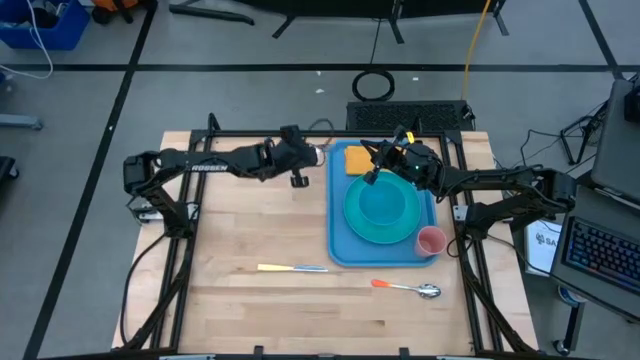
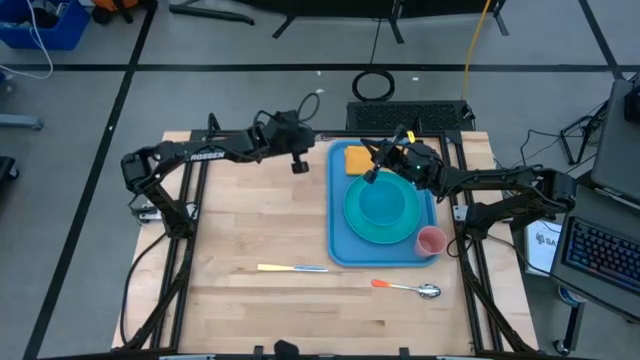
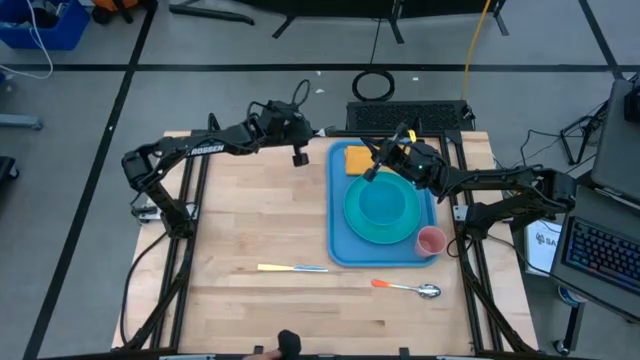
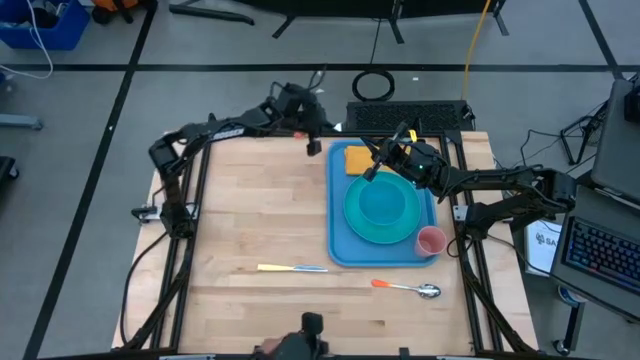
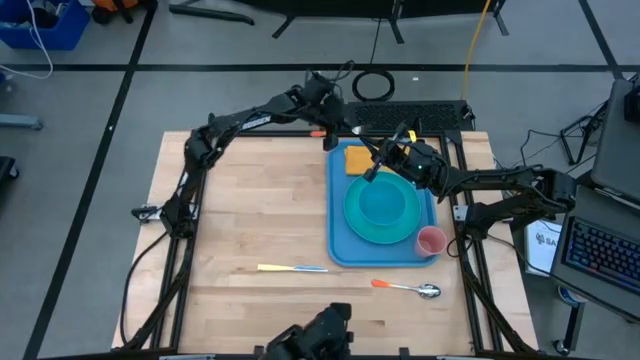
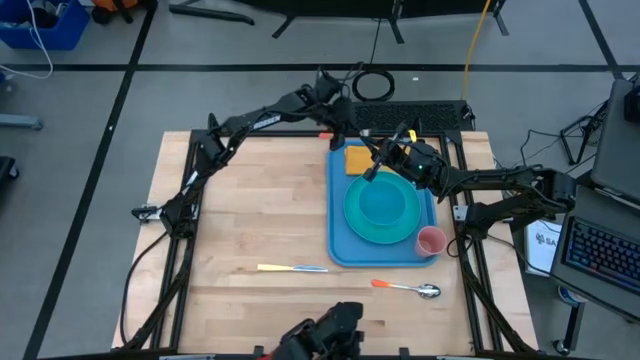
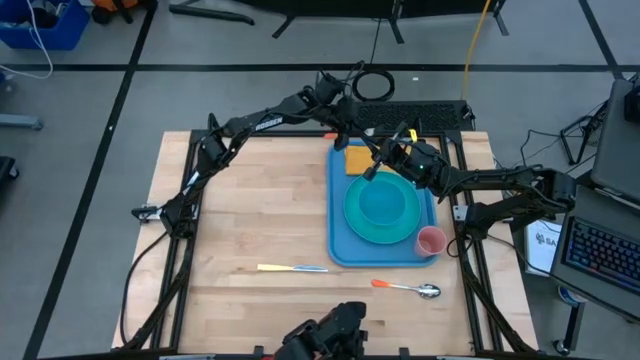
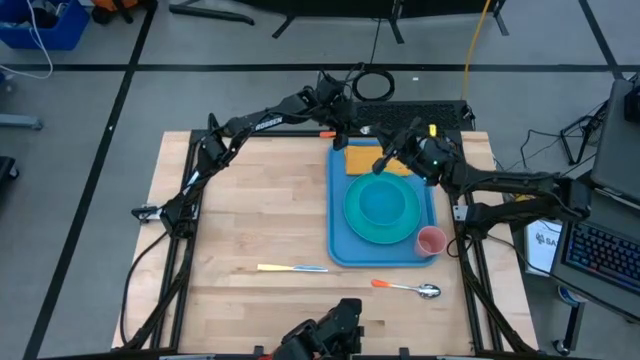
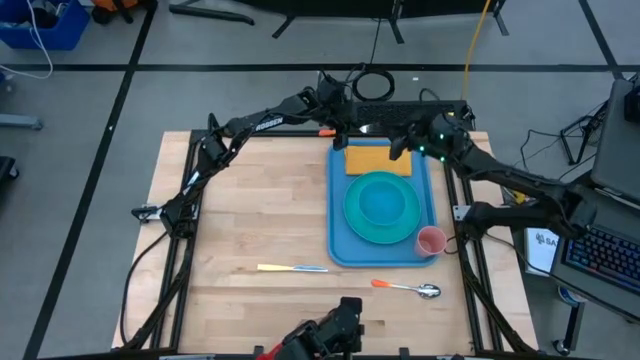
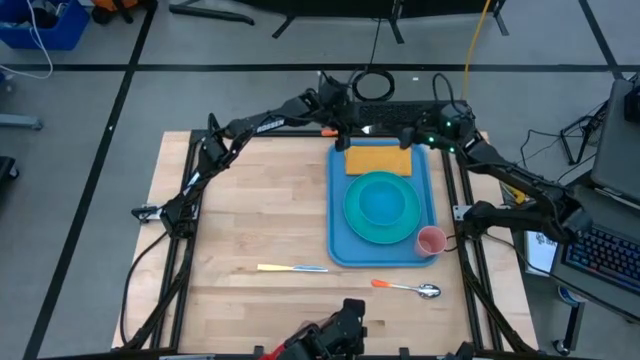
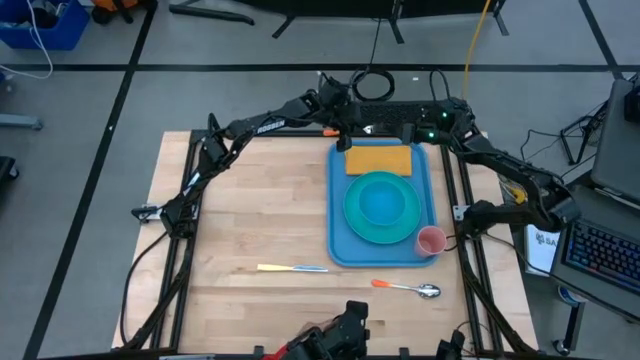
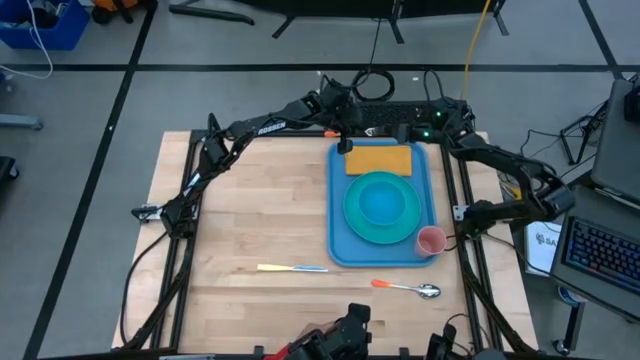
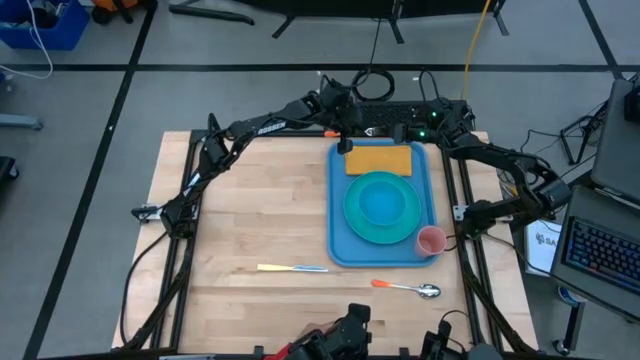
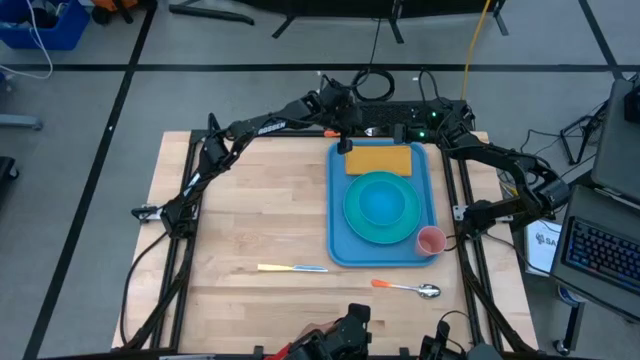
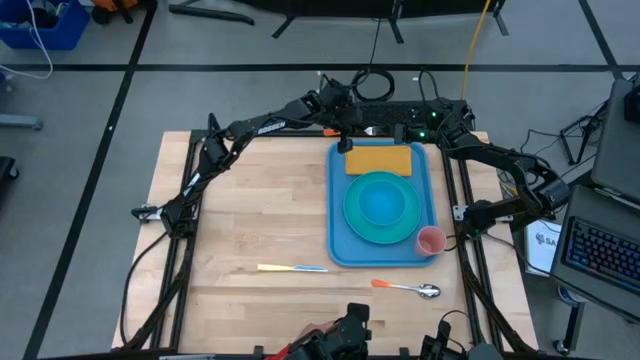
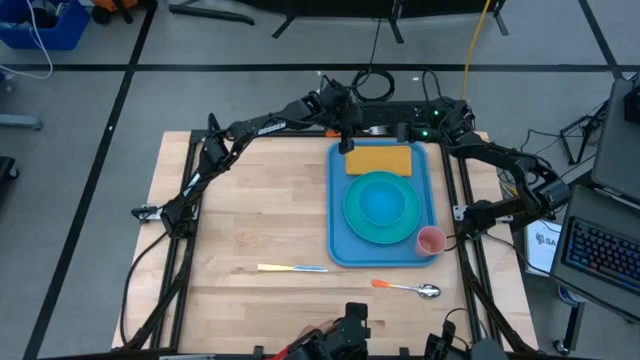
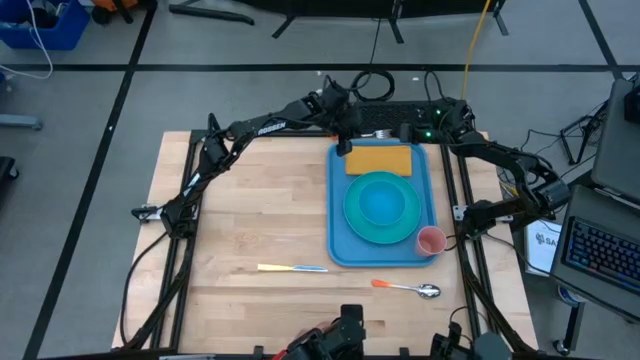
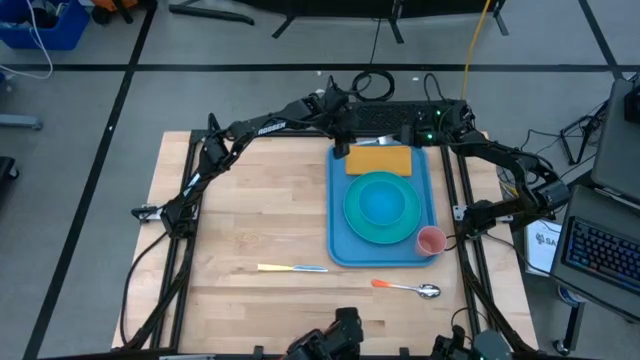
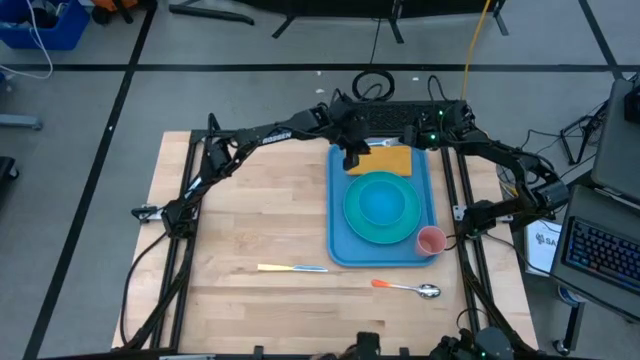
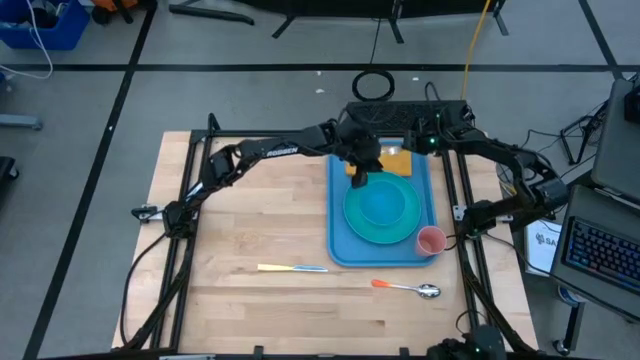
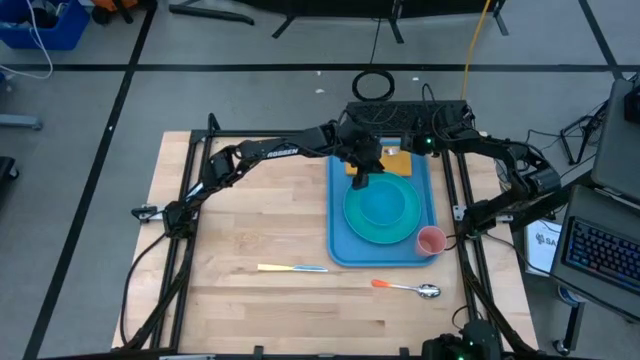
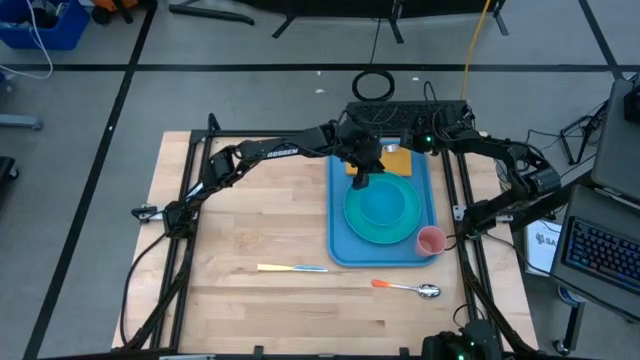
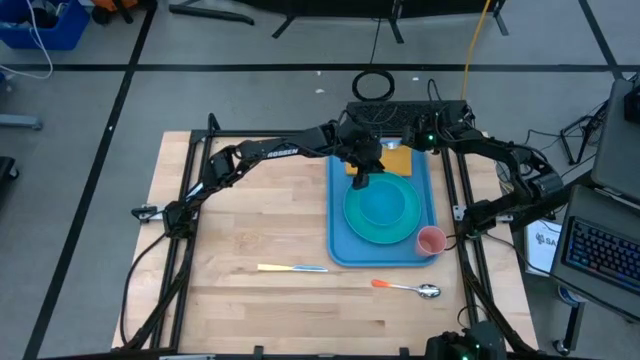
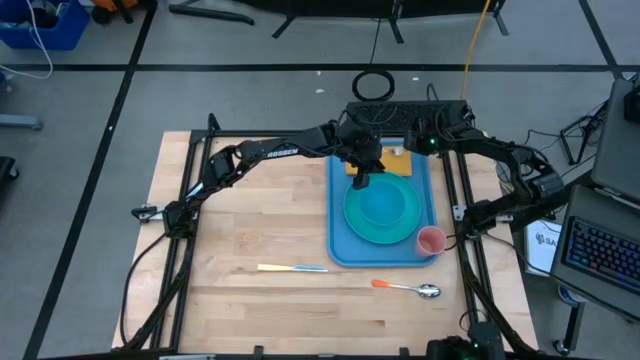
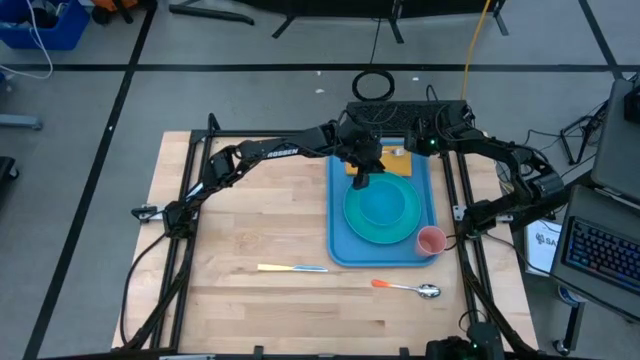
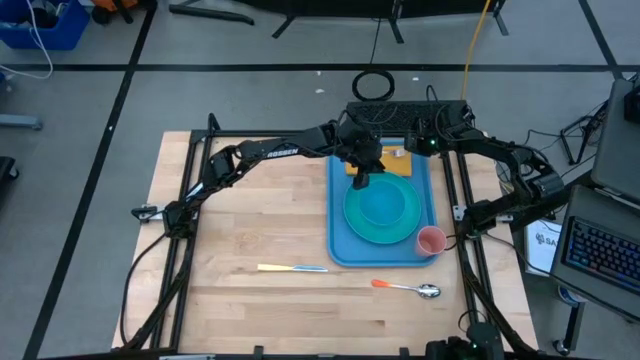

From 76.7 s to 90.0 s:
Task: Set up tray
Put the orange fork on the yellow table napkin on the blue serving tray

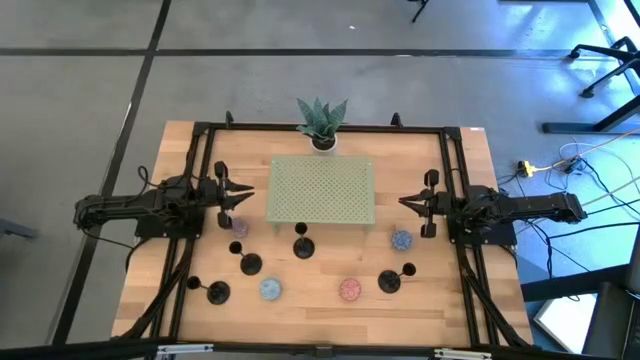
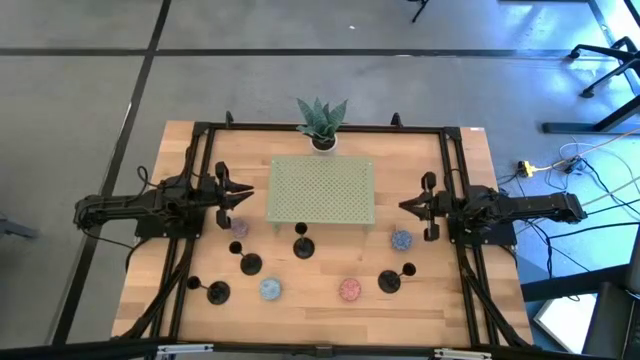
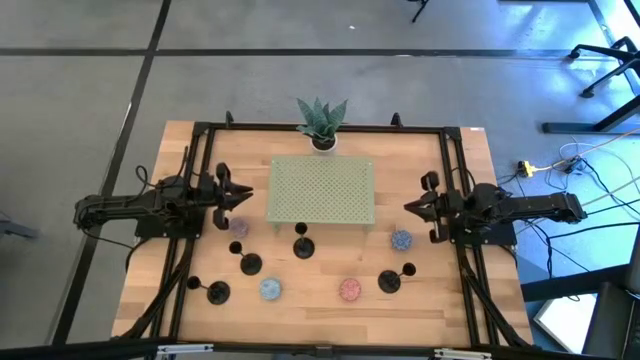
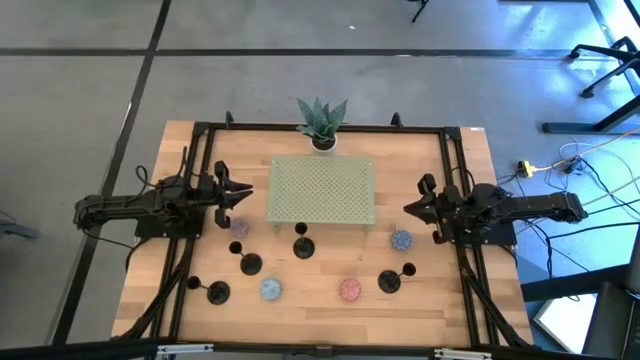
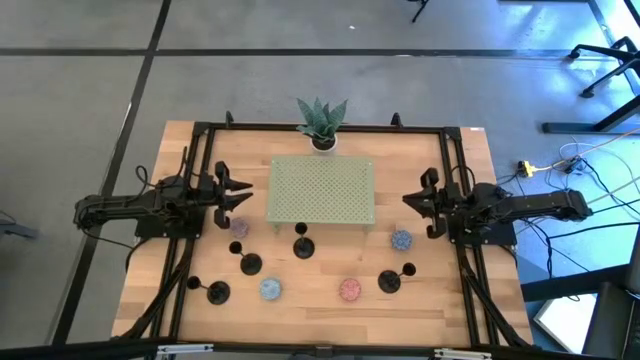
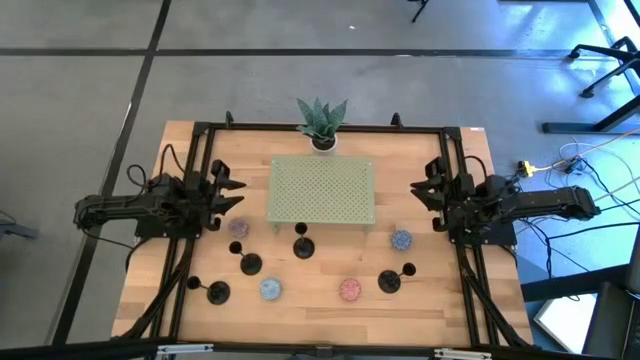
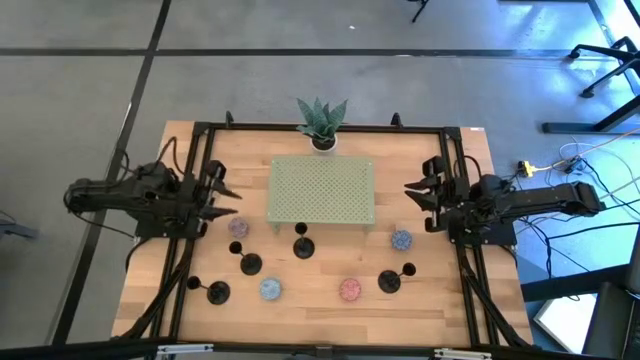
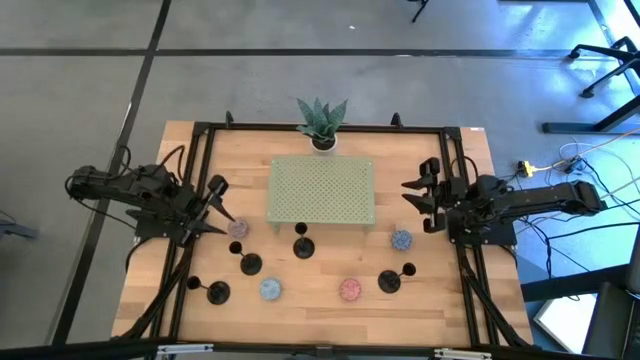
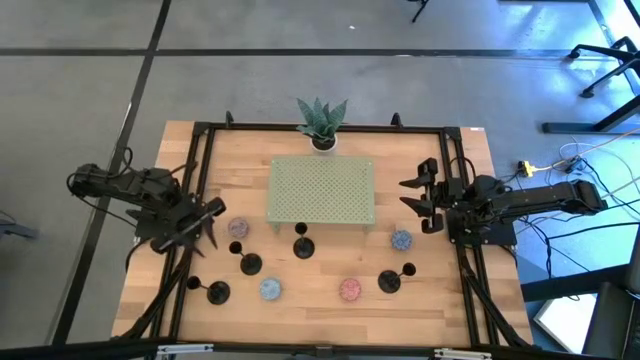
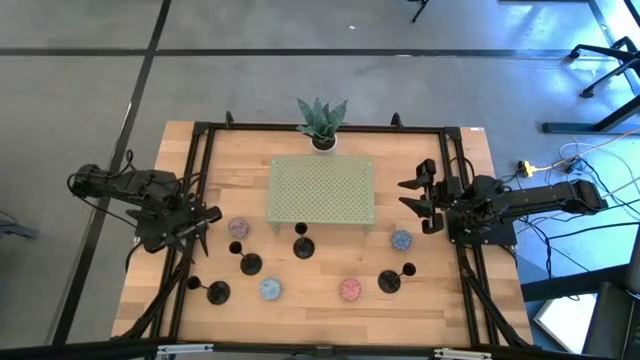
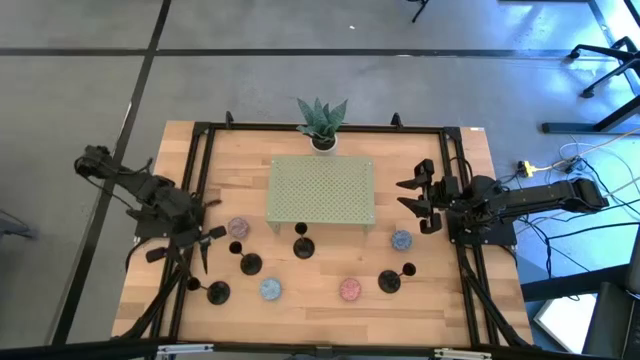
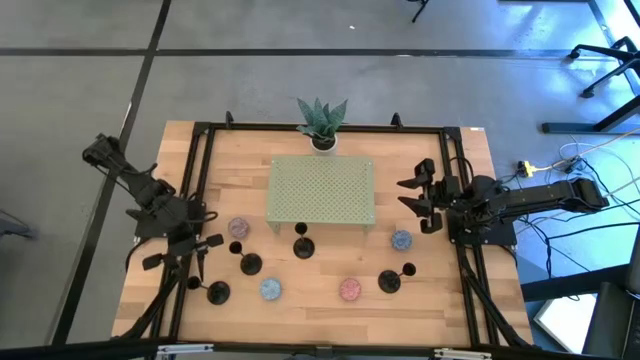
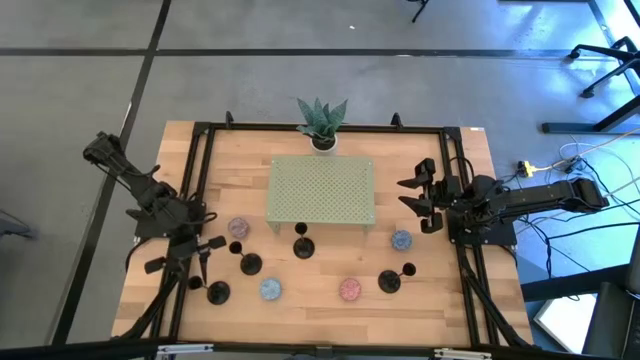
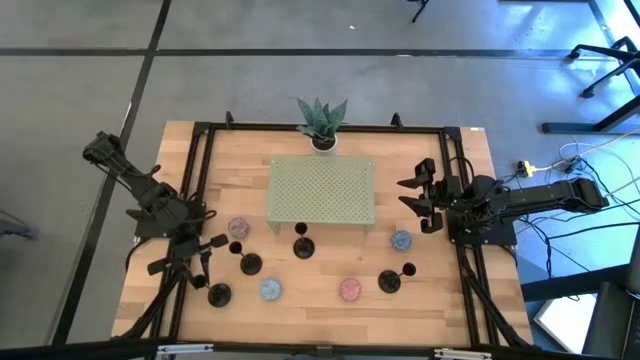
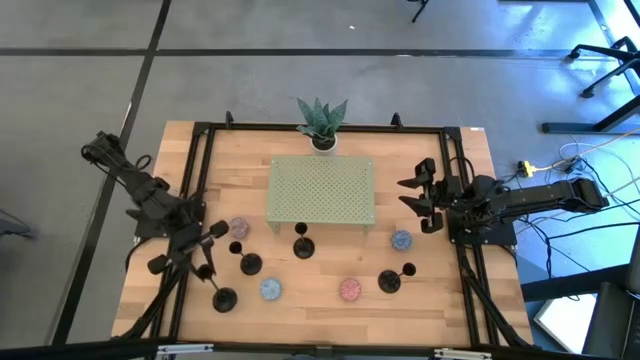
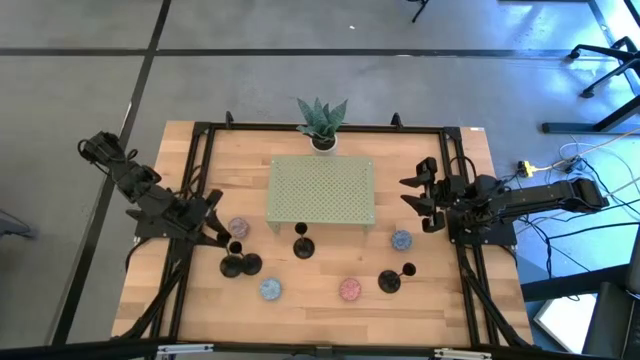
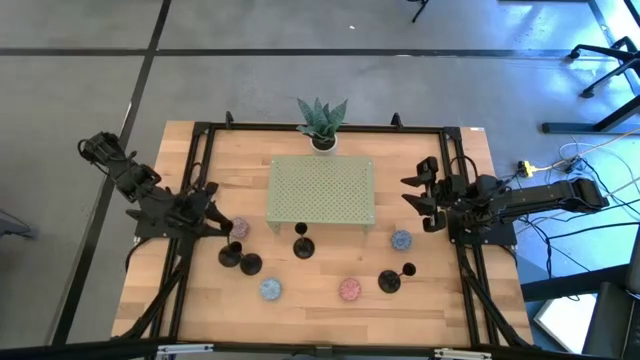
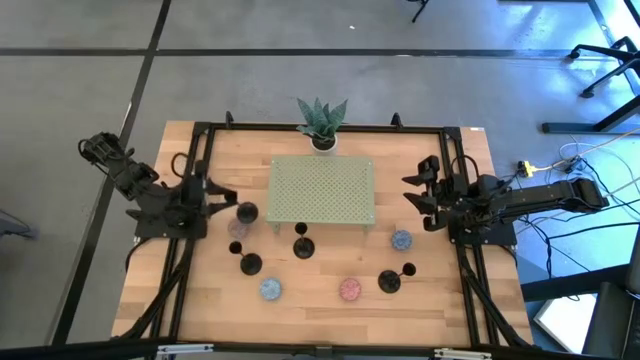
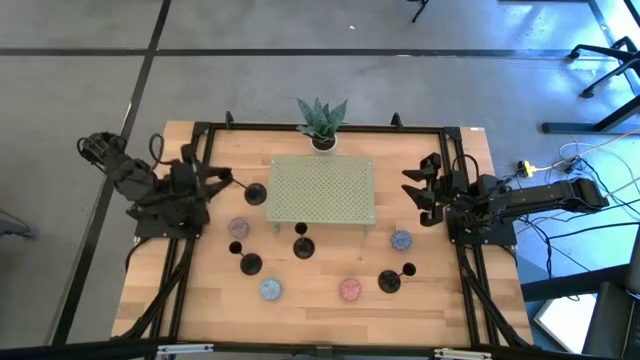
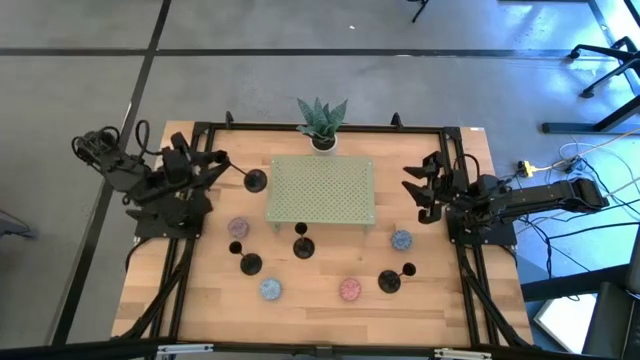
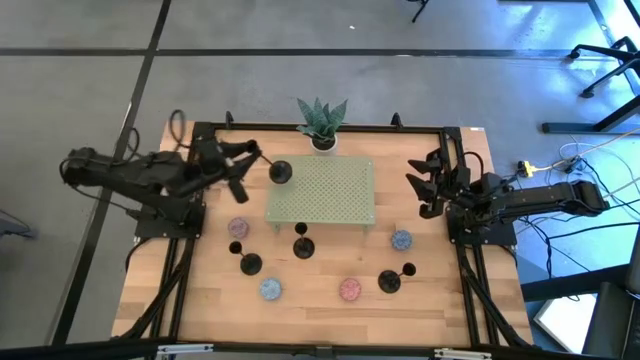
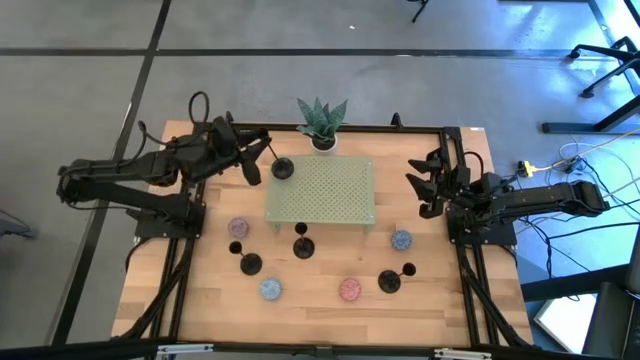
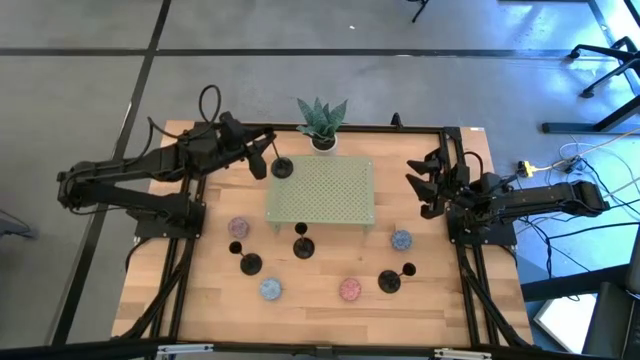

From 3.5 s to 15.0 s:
Task: Pick & Place candle stick holders
Put the black candle holder on the shelf
